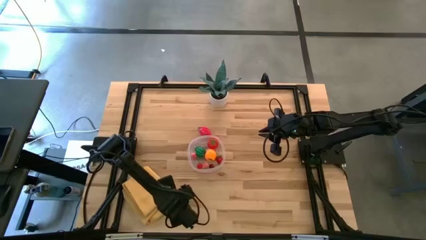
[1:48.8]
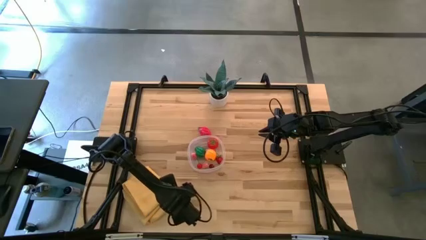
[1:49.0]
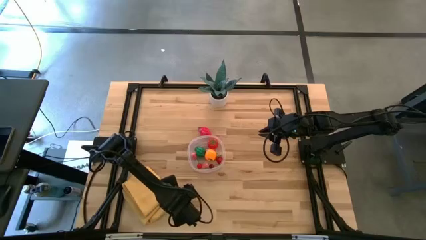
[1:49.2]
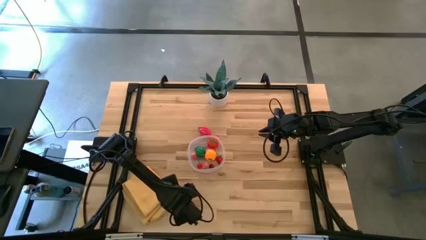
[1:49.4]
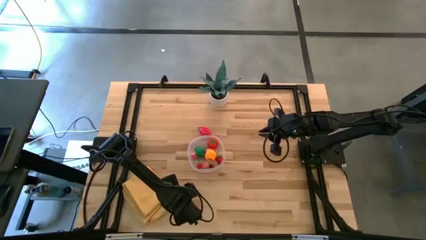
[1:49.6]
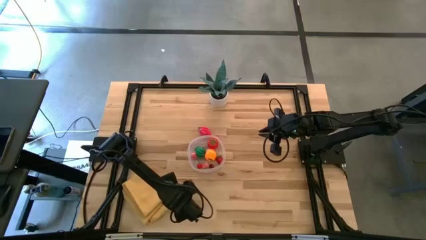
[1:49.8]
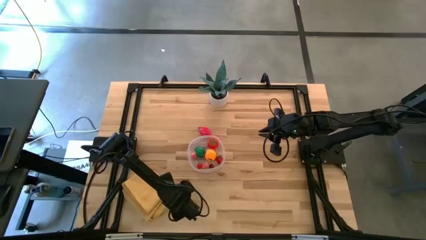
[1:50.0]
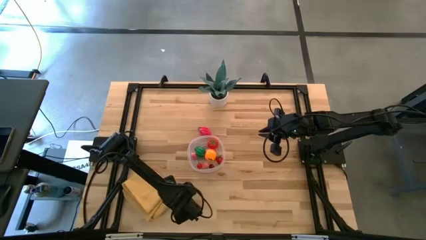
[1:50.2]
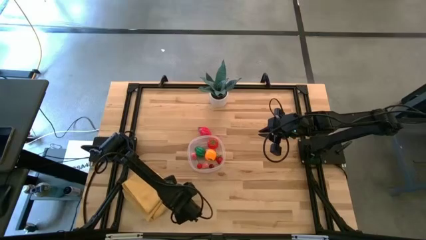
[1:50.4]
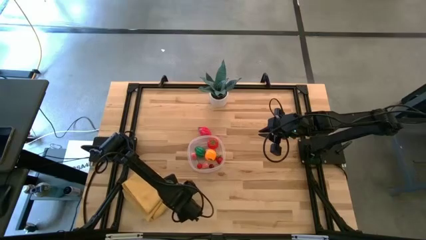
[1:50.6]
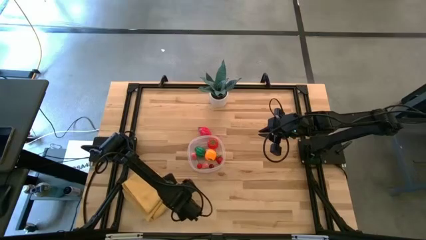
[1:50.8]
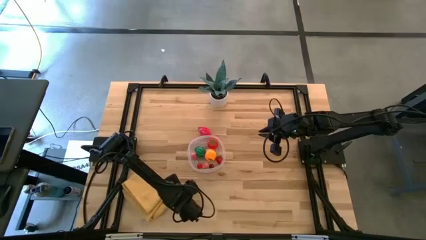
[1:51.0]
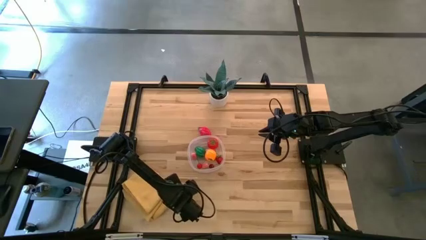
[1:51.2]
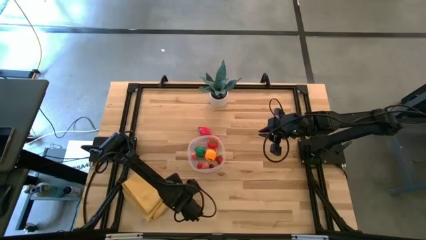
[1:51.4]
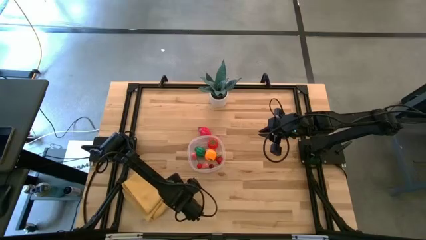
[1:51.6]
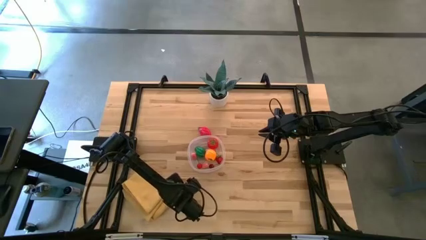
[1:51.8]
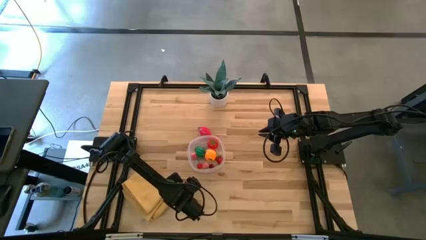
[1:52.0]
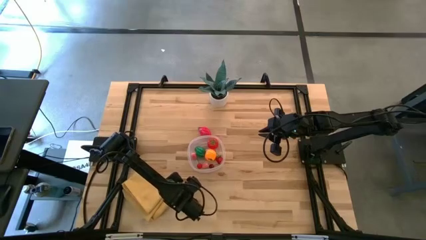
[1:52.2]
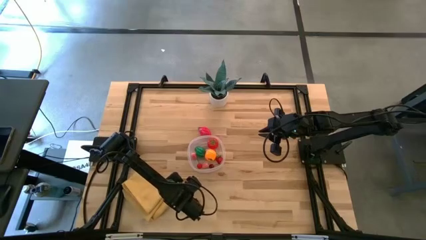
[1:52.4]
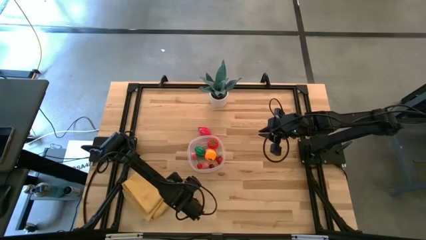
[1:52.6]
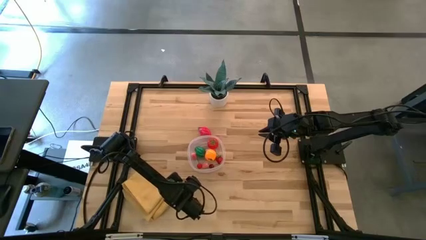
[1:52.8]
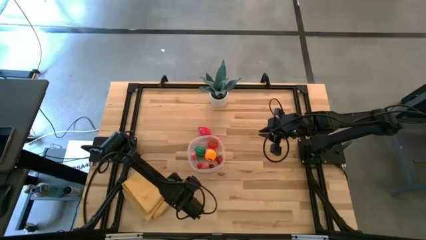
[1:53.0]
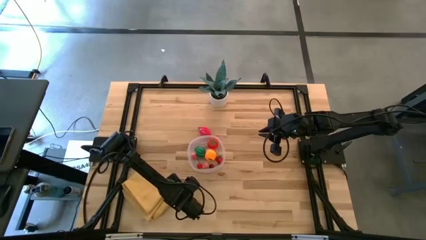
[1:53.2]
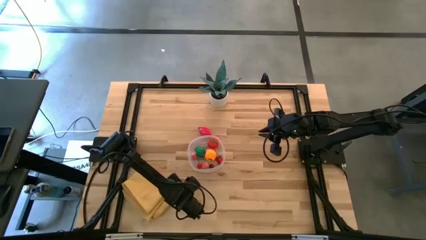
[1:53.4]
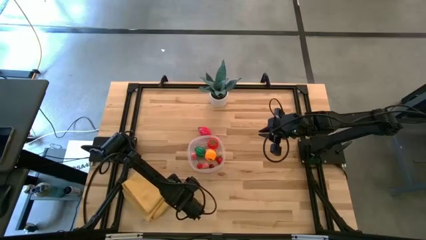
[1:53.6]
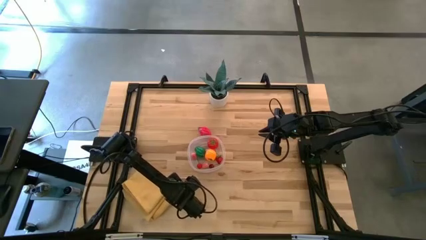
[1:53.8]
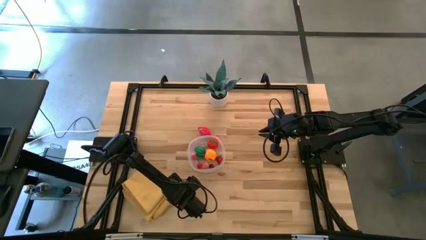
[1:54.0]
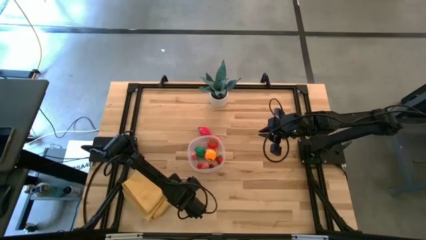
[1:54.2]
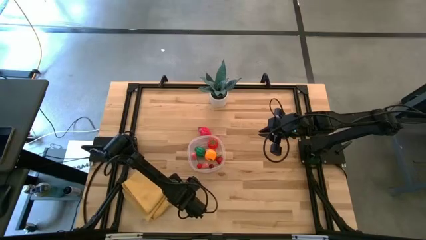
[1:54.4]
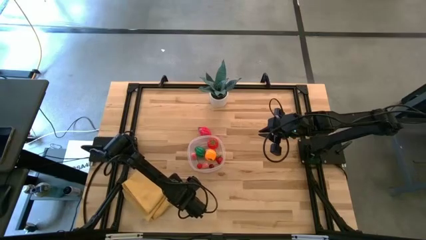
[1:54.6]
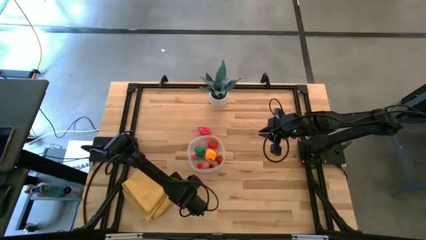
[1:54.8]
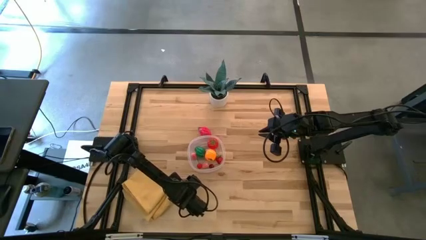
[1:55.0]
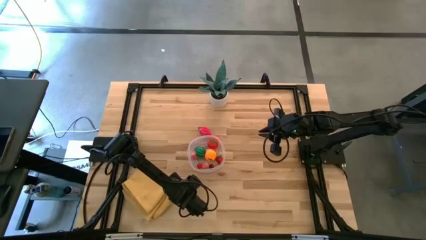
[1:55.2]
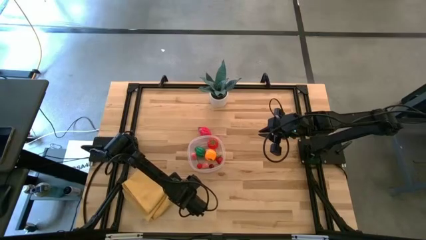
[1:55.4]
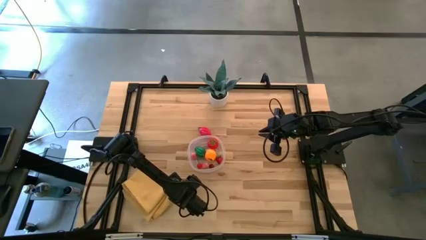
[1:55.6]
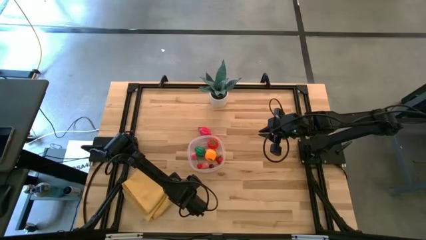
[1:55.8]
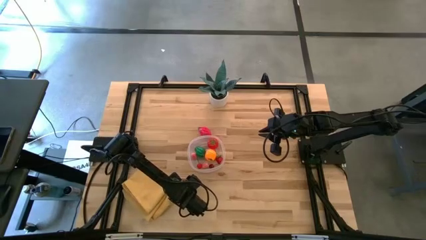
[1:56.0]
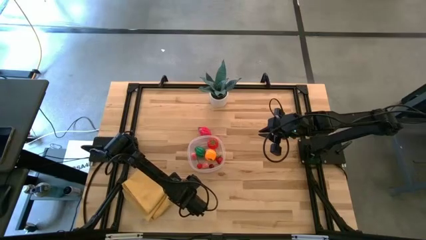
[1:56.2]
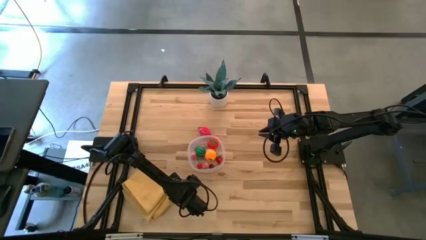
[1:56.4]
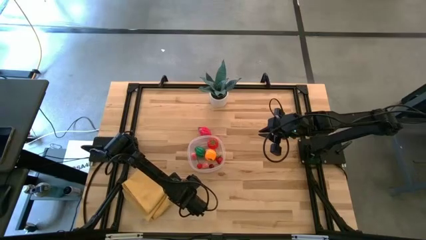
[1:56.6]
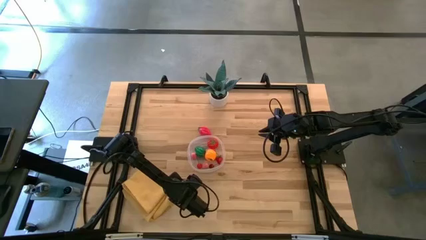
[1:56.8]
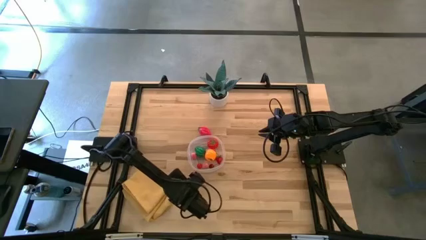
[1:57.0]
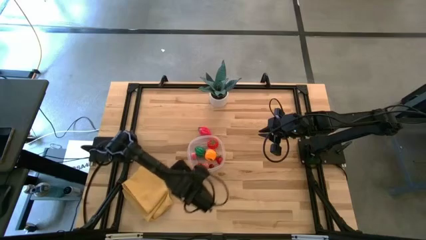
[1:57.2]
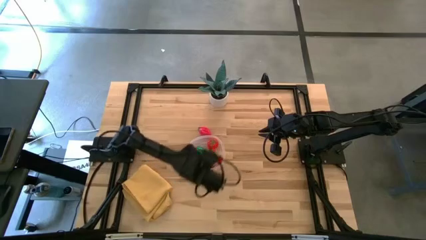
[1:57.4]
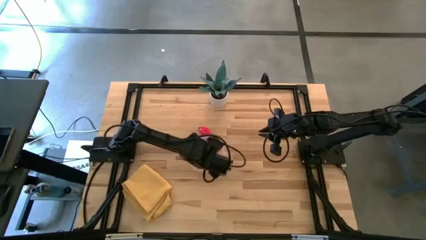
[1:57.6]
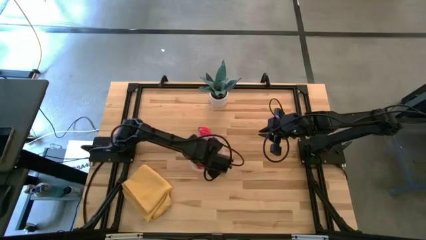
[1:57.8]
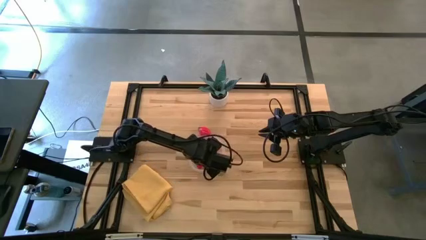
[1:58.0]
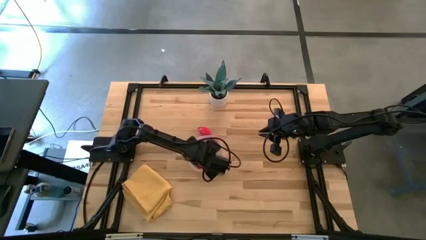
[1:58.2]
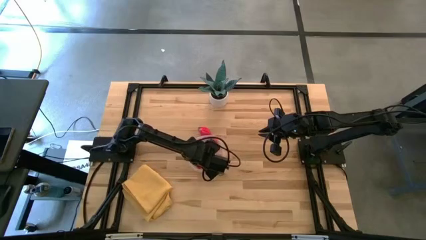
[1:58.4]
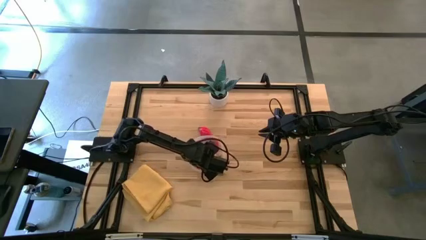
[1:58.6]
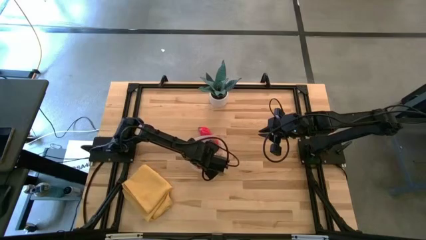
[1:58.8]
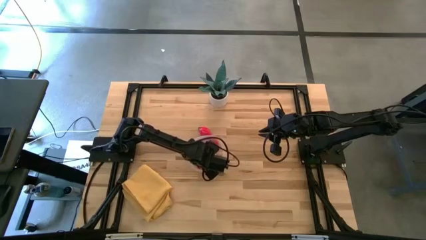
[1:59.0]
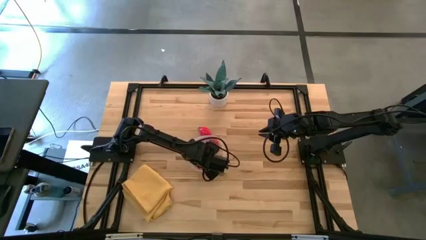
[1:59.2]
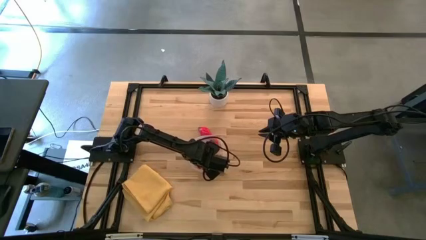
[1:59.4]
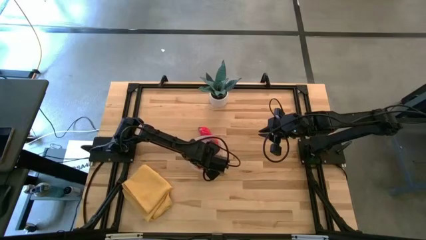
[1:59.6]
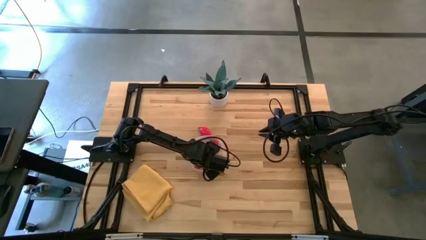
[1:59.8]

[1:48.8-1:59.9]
Task: Pick and placing Produce into tupperware
Put the violet onion into the transparent bin

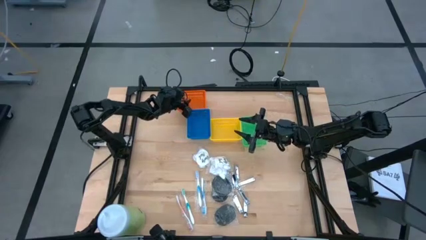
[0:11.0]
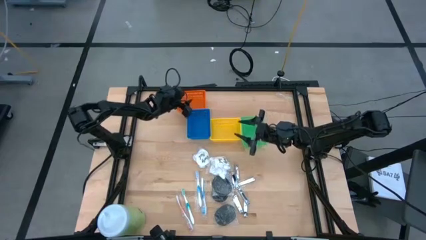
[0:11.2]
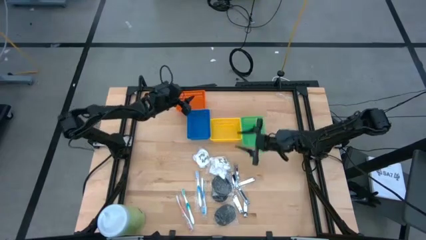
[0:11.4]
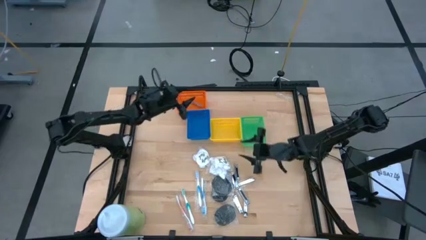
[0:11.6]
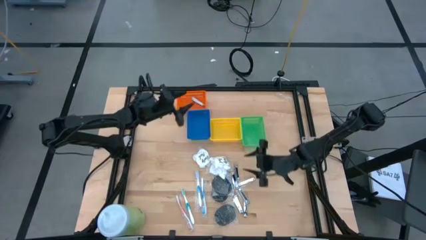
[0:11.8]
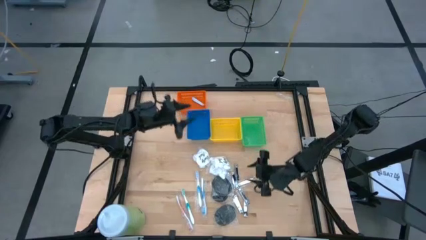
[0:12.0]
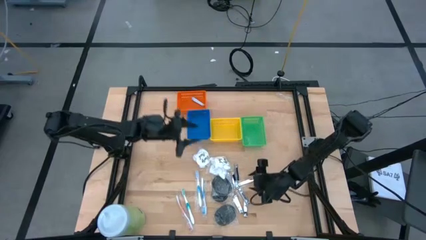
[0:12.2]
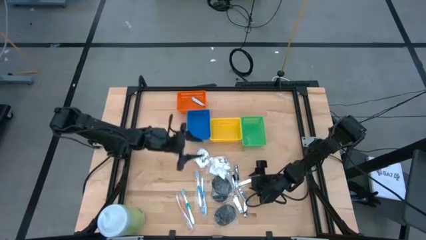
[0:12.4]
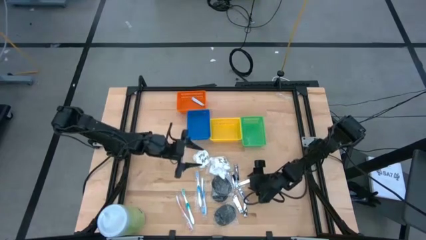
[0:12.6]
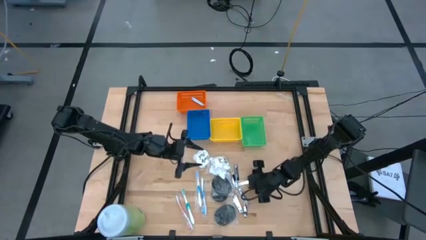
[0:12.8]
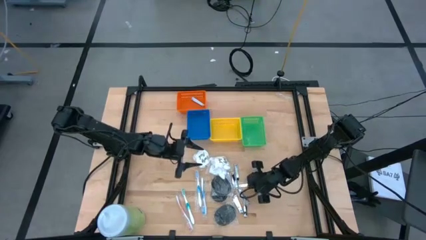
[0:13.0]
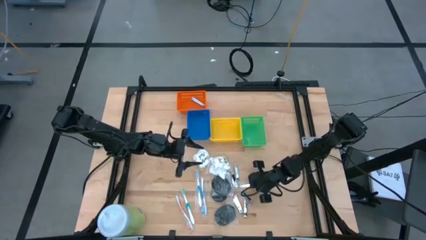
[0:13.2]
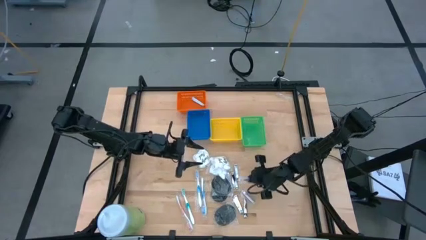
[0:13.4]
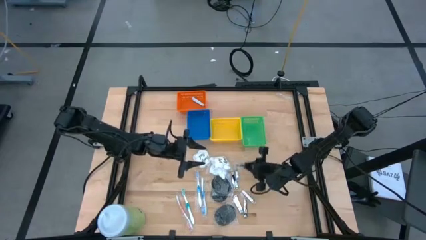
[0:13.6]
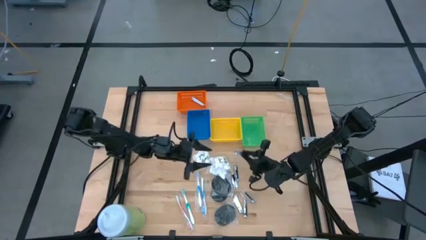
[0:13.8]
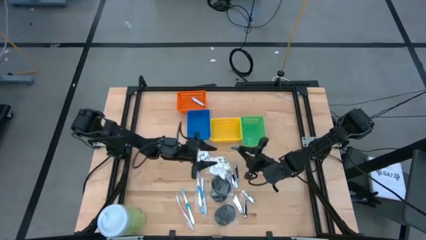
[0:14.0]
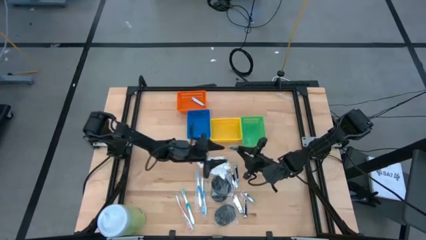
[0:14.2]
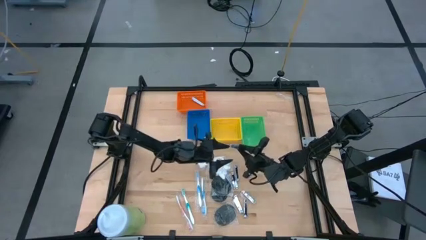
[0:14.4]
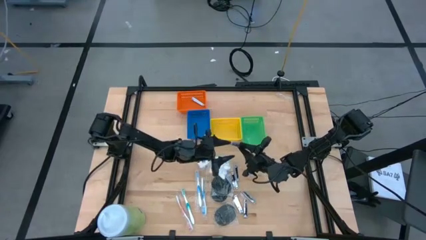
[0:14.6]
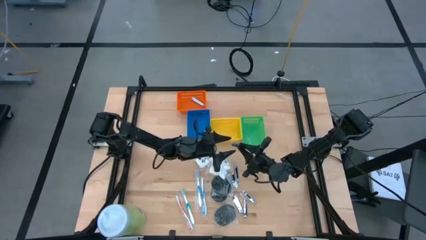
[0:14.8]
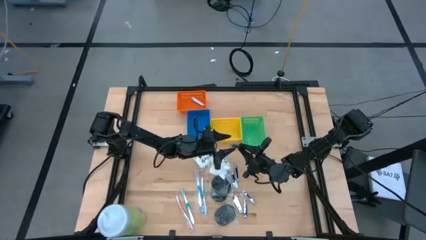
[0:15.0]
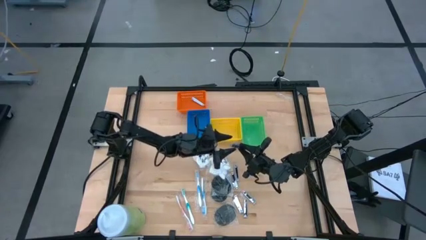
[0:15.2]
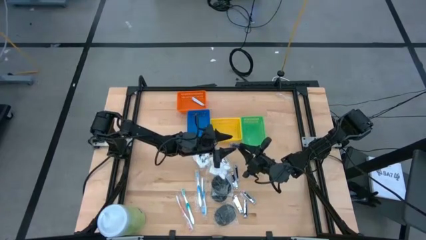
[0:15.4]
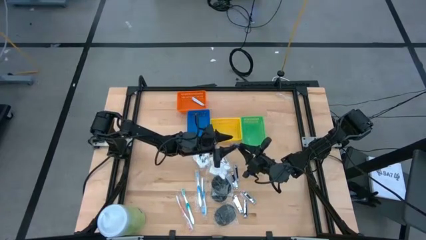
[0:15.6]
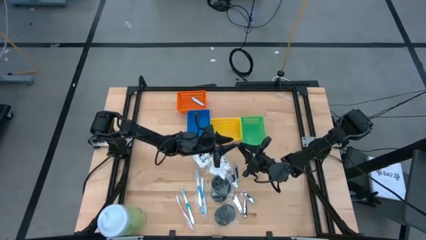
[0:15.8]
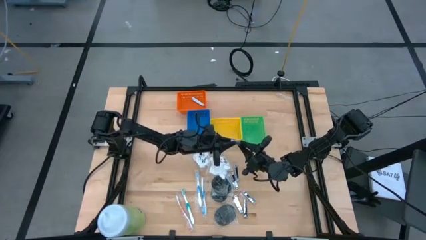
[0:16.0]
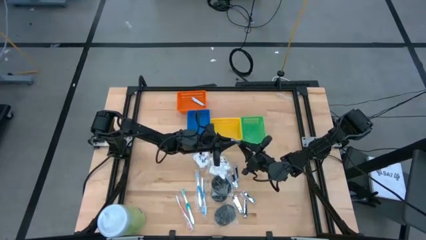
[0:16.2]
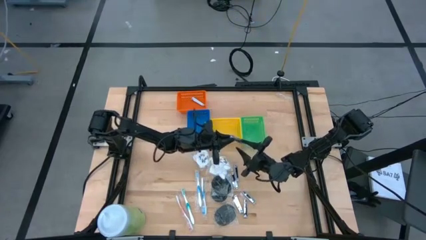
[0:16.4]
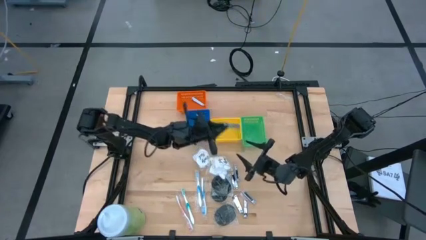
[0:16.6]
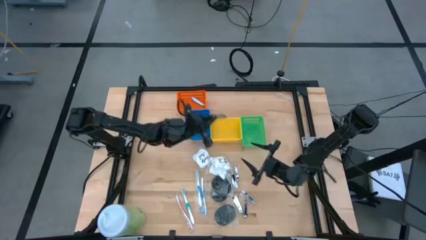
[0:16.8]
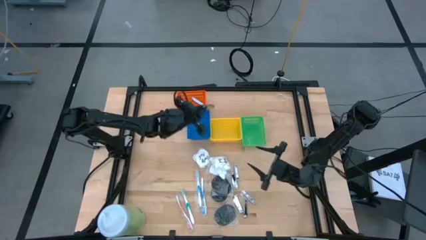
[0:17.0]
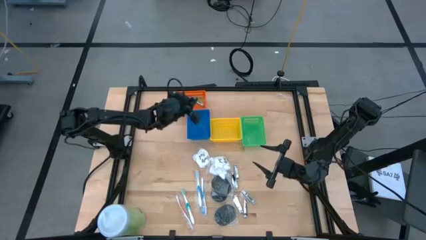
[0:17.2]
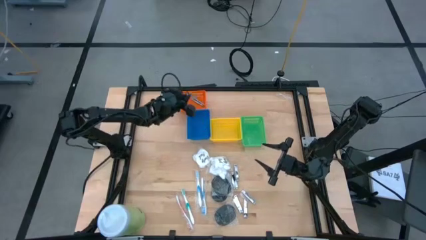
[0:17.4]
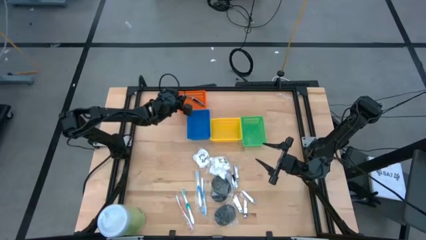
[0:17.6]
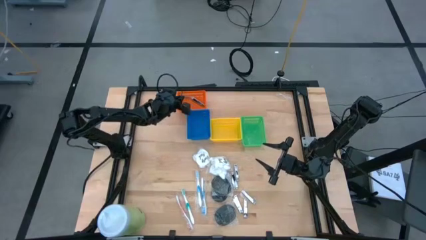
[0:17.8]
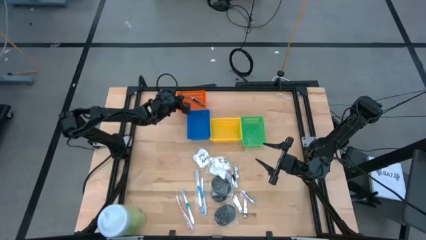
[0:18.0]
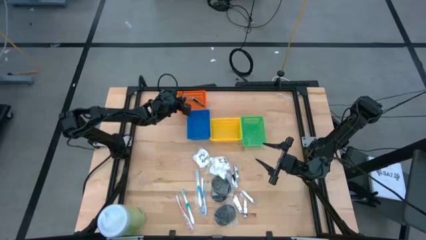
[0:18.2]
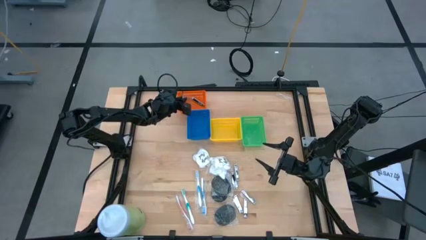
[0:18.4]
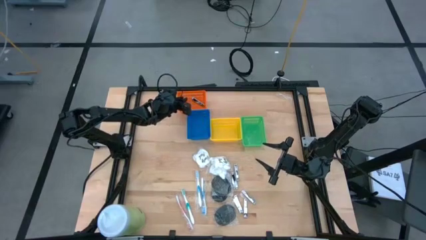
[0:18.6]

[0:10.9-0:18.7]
Task: Pick & Place Travel size toiletries
Put the nail cutter into the orange basket
